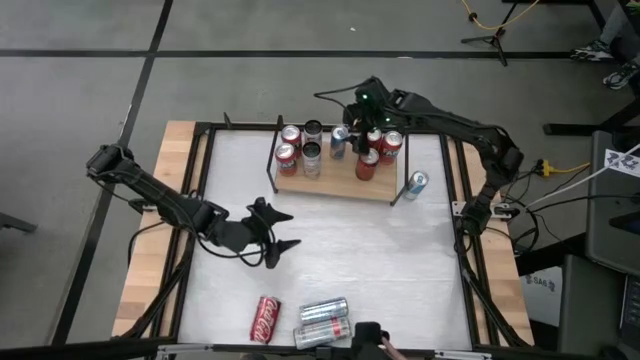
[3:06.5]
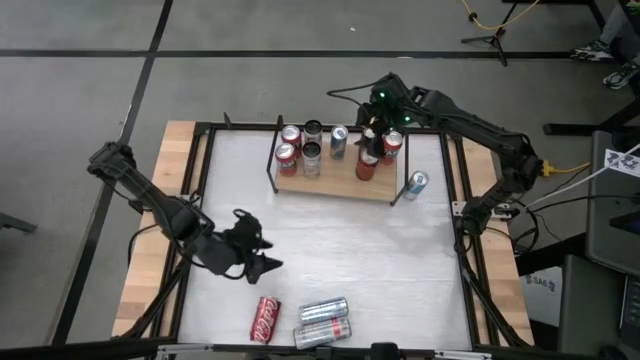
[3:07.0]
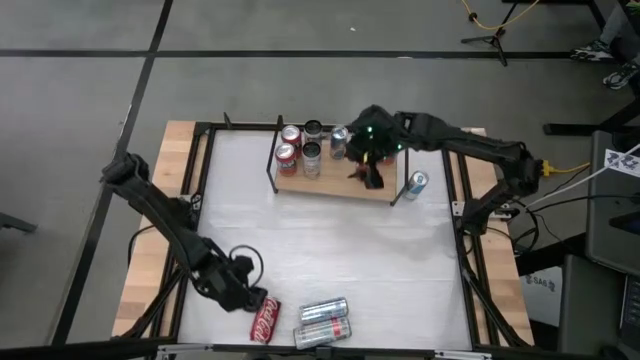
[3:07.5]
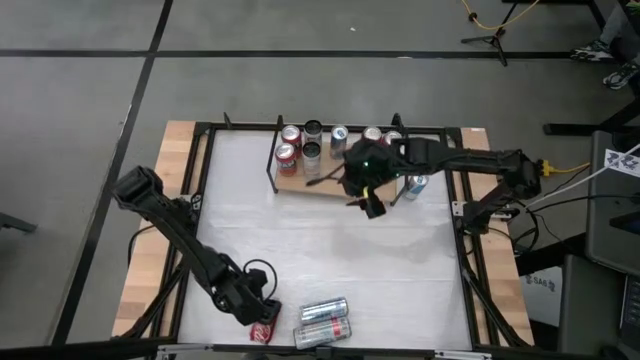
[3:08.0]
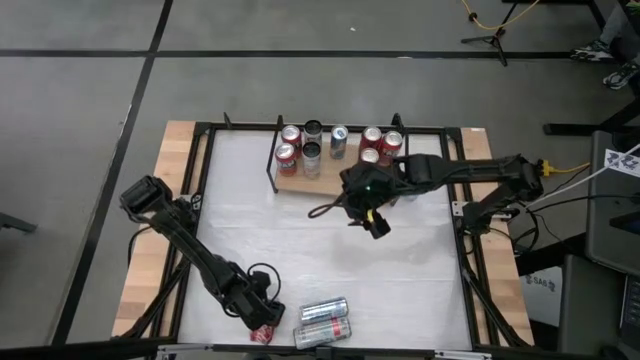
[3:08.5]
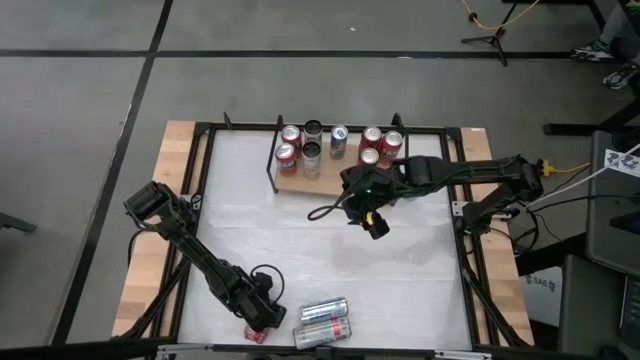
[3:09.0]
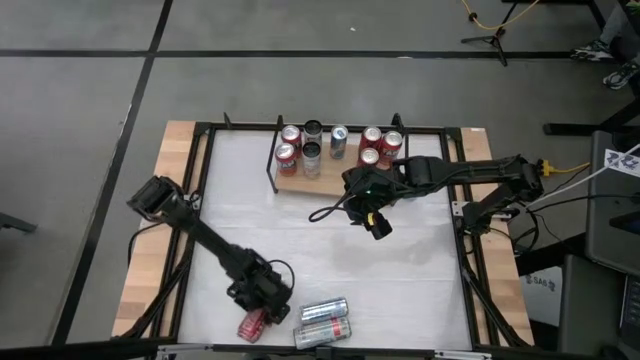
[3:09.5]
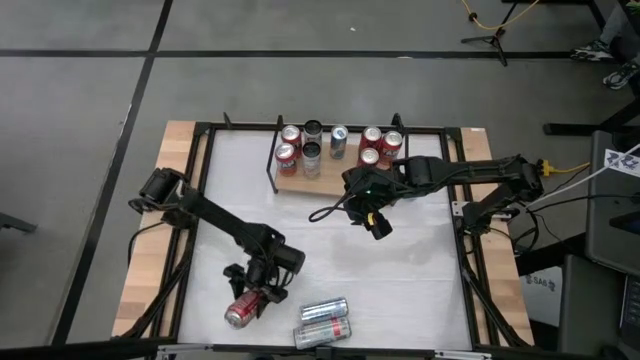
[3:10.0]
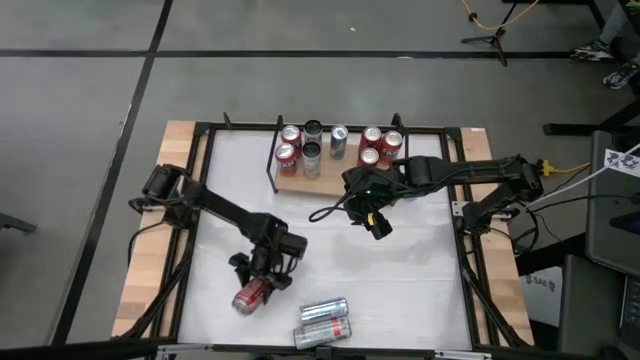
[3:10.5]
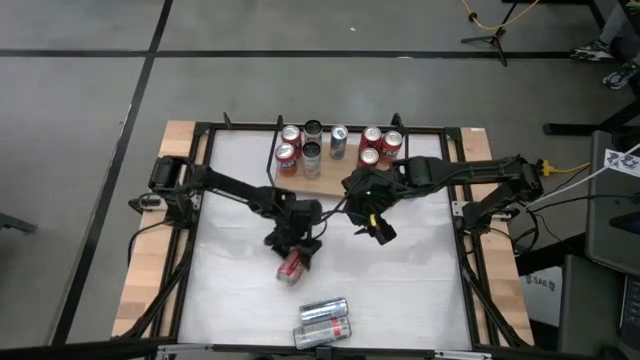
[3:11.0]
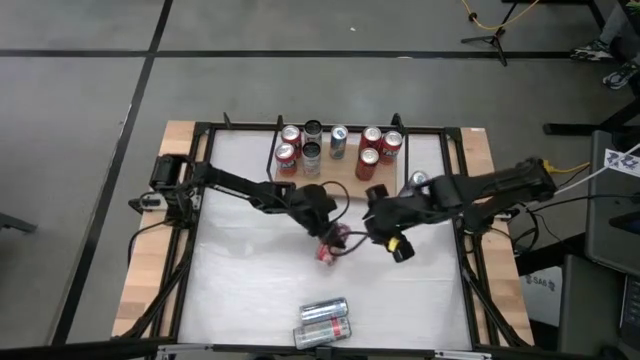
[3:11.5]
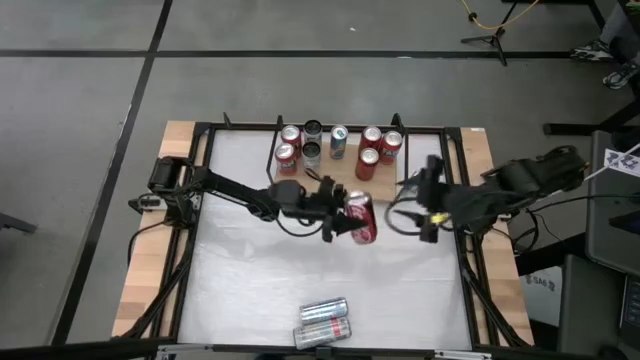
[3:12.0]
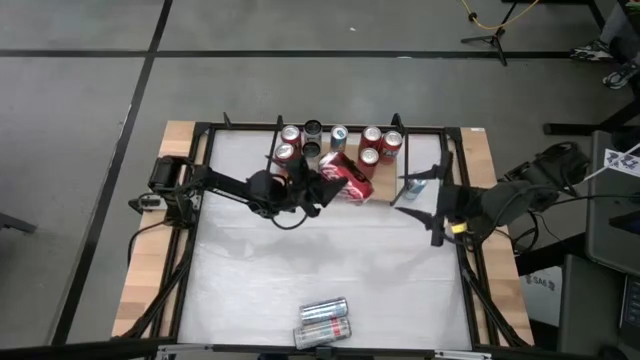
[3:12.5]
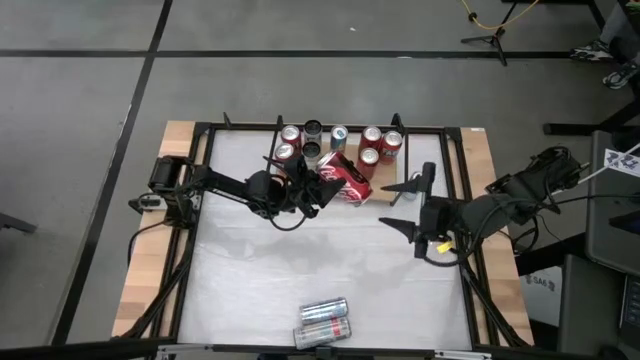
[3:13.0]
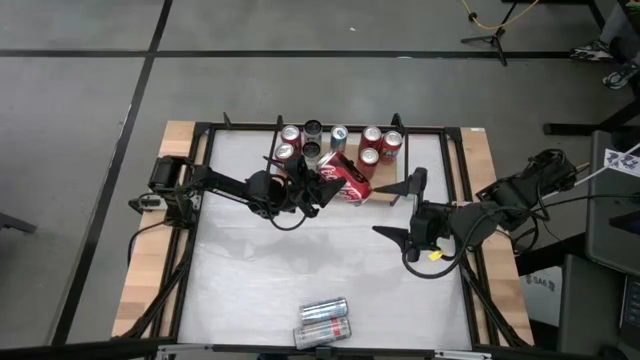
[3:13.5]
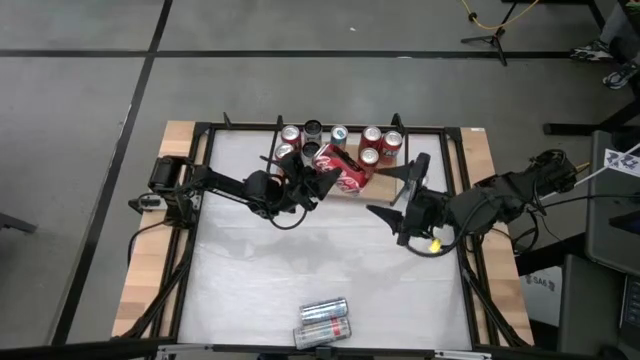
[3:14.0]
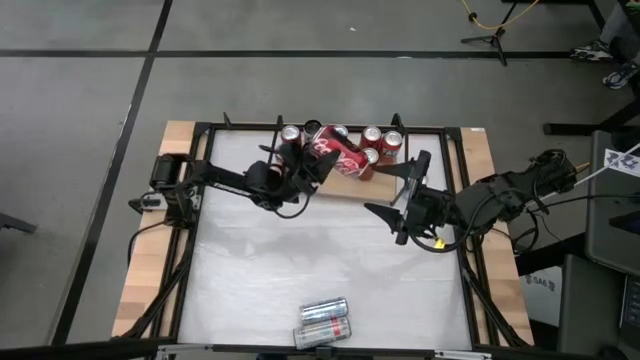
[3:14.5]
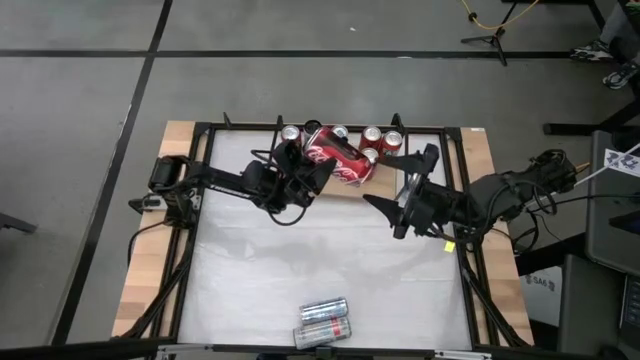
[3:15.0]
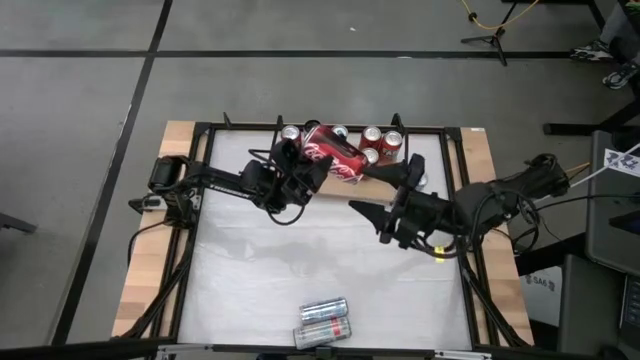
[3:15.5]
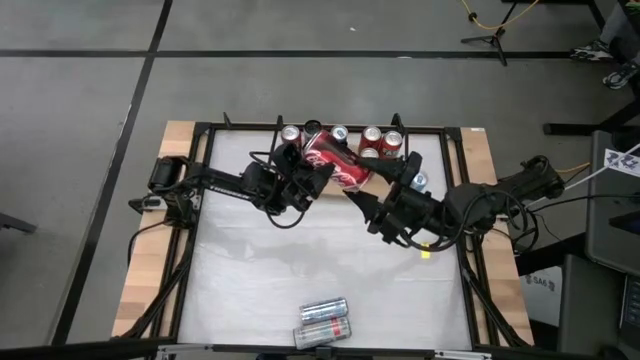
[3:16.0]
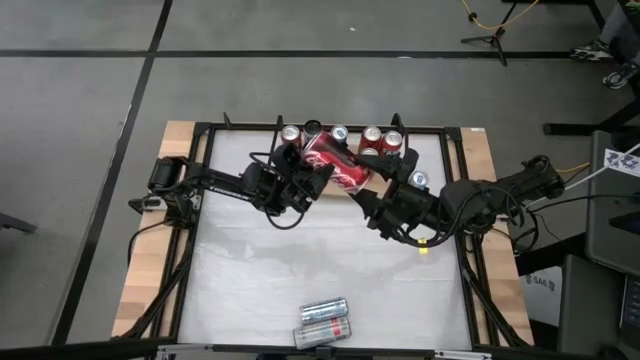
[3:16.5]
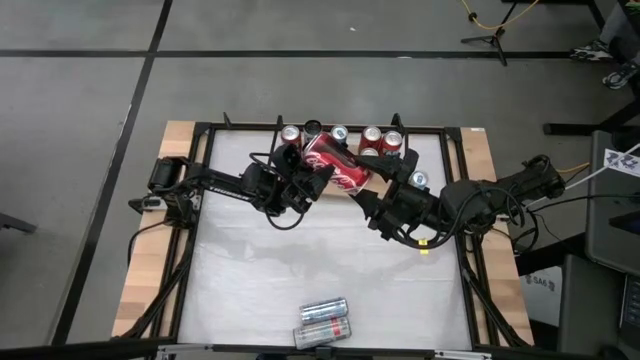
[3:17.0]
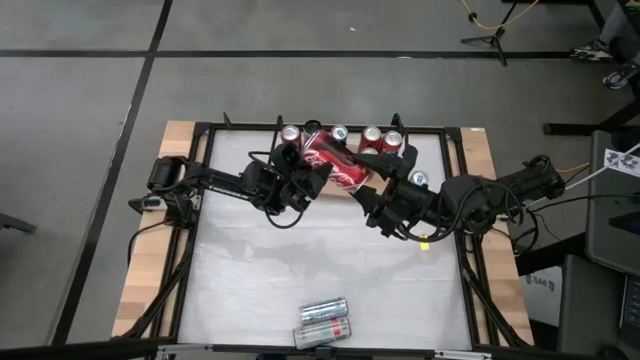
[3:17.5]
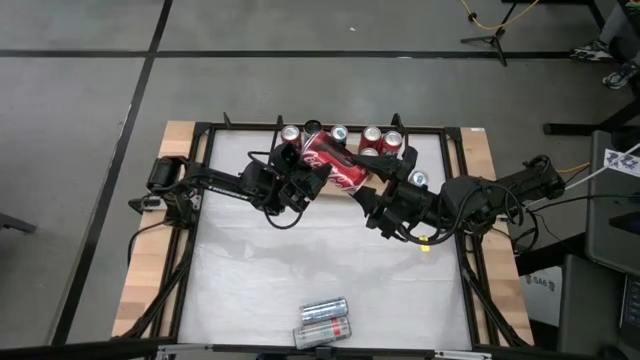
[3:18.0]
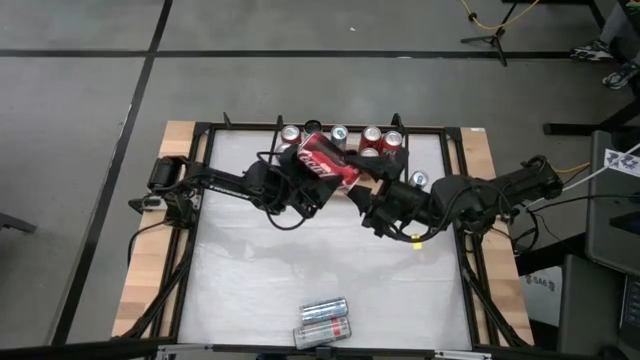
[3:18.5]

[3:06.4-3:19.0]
Task: Place canned beverage on shelf
Put the red-white soda can on the shelf aligned with the red-black soda cans

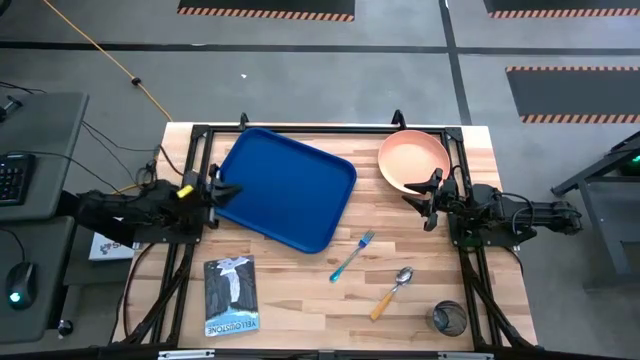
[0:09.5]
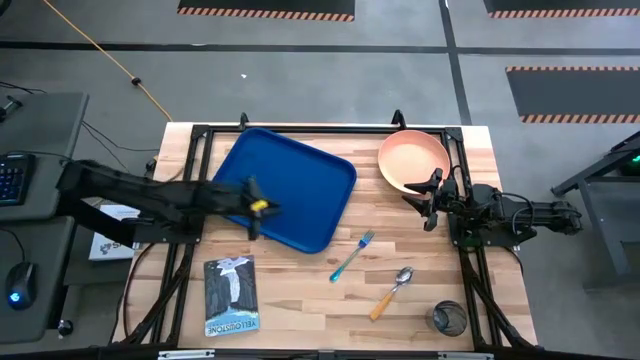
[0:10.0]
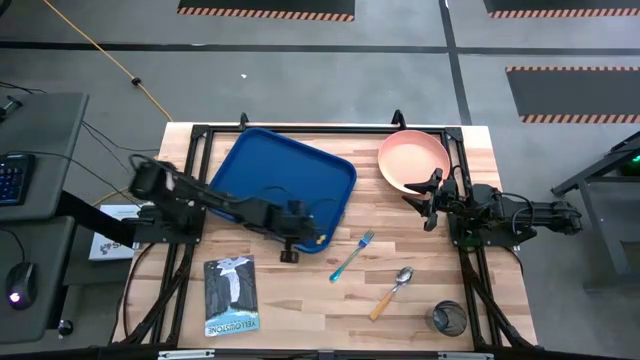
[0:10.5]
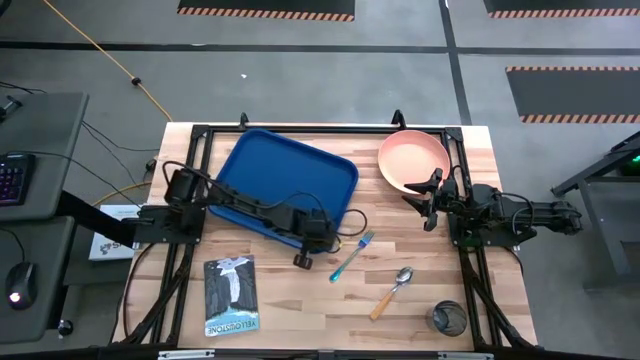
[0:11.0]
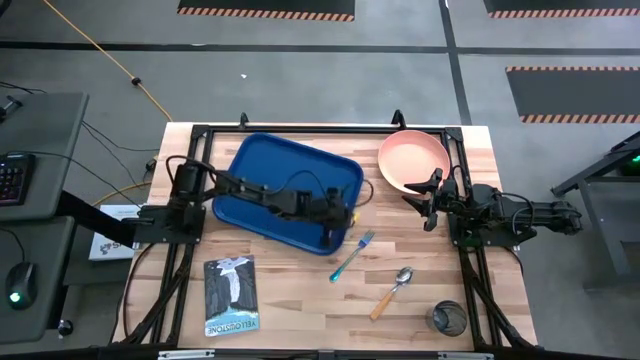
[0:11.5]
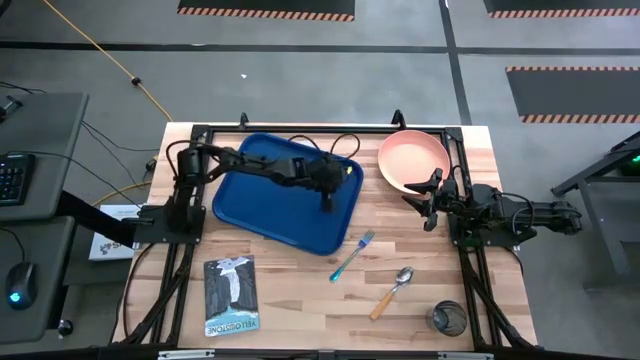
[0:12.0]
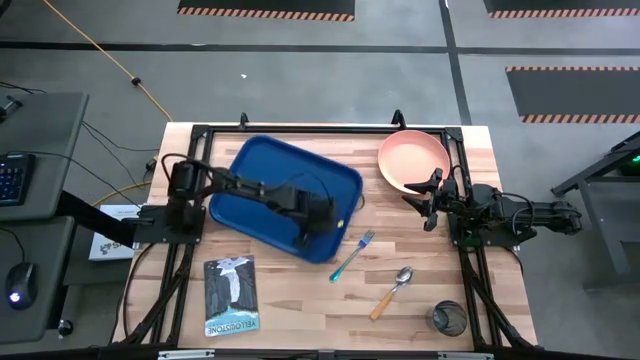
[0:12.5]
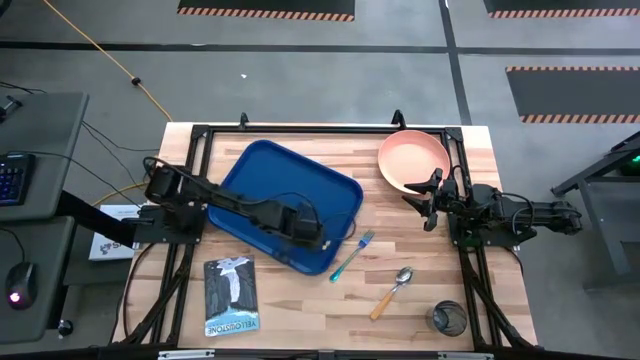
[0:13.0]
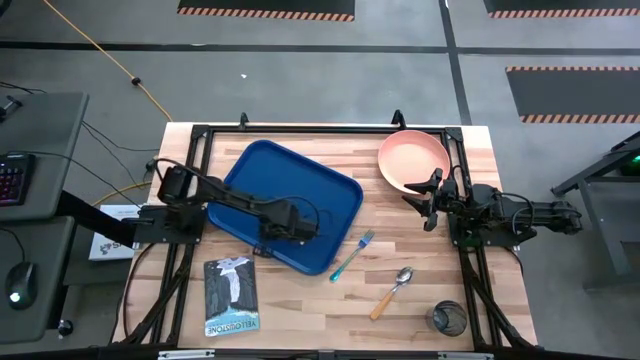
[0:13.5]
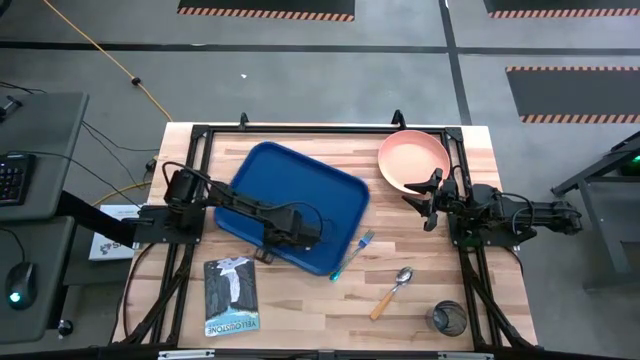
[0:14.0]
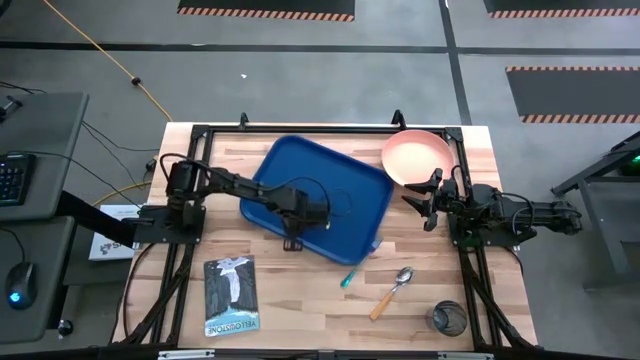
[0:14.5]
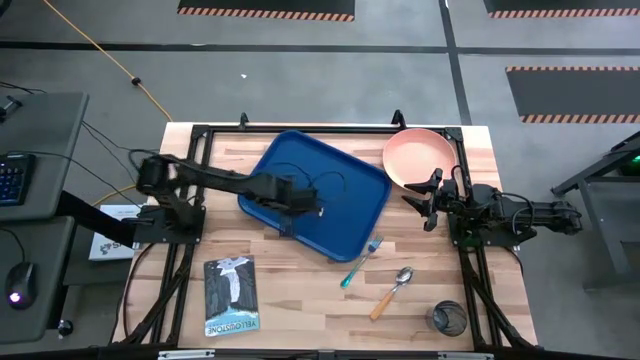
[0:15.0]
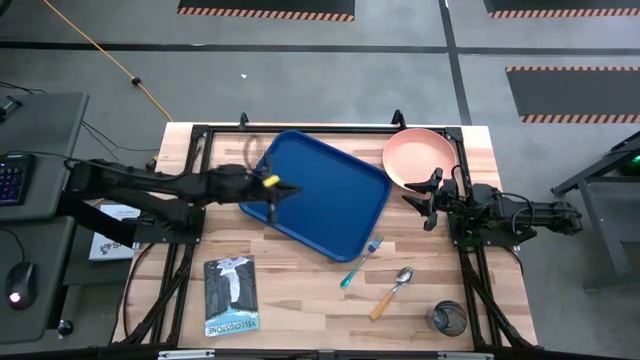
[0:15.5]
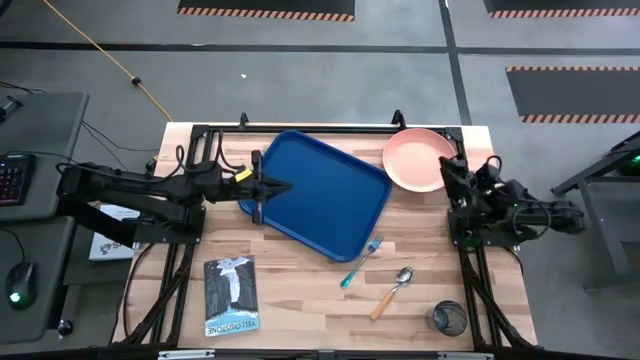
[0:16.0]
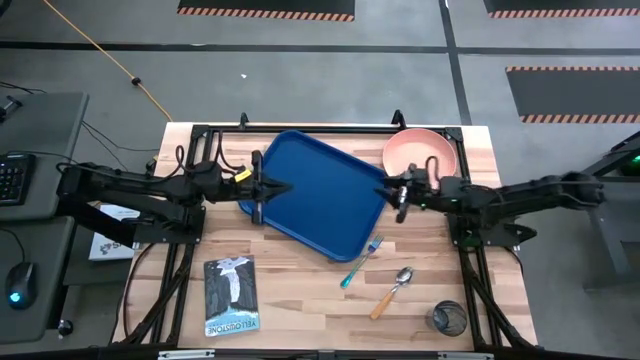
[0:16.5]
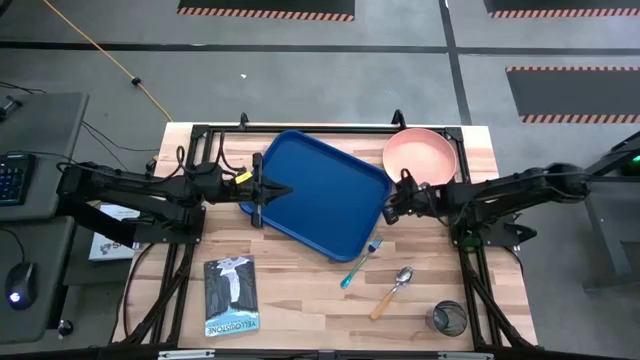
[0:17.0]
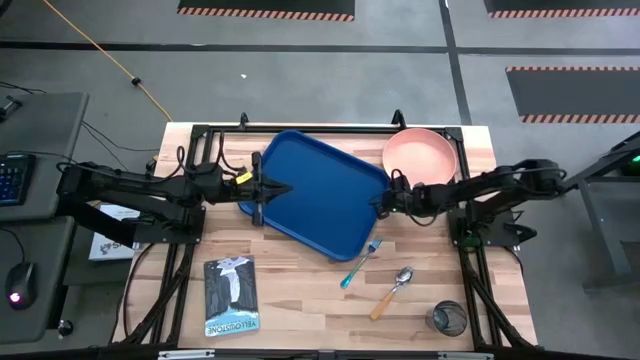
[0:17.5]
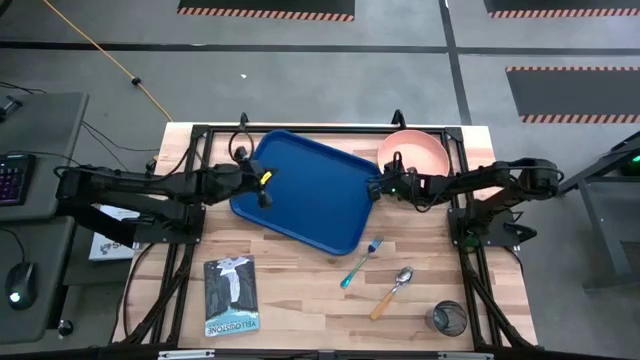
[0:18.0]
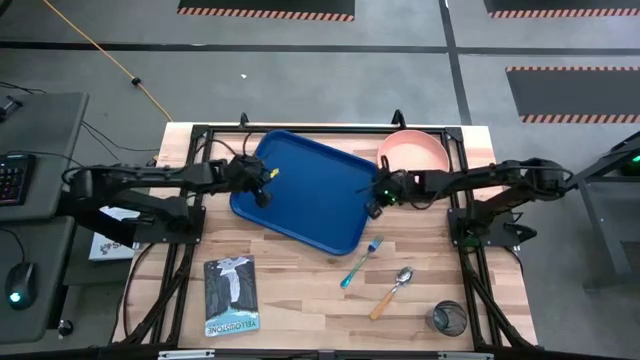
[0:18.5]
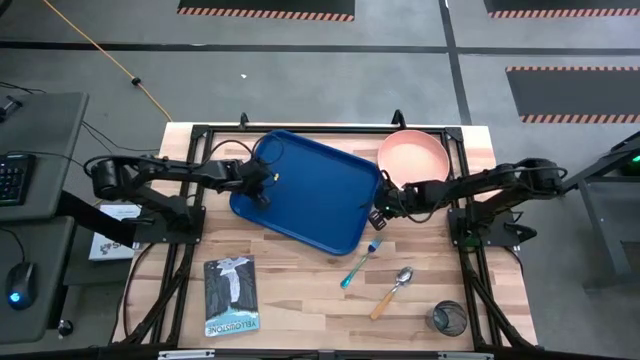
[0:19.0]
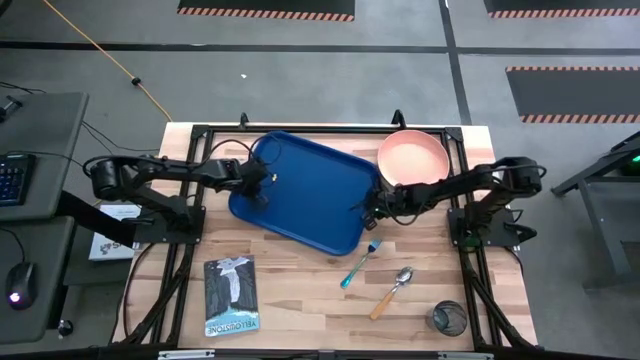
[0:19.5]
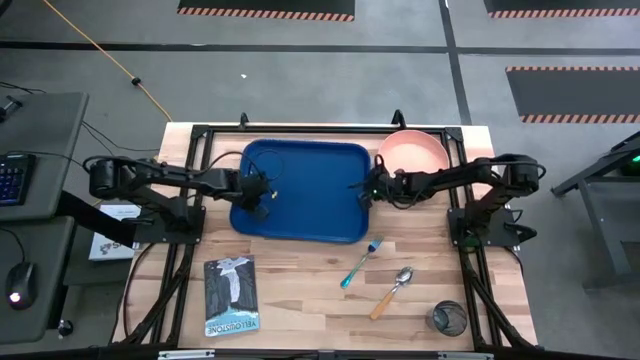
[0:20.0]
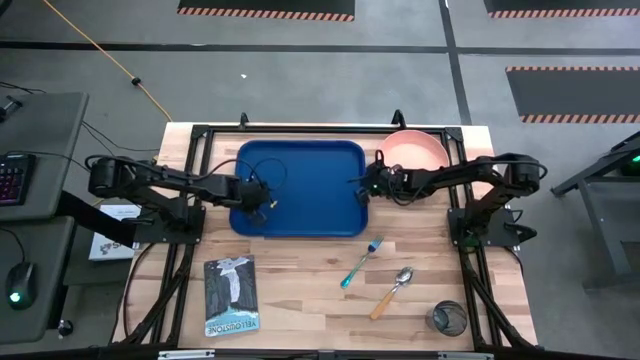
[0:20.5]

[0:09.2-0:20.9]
Task: Pick and place plate/cup/fork/spoon on tray
Prepare the blue tray
